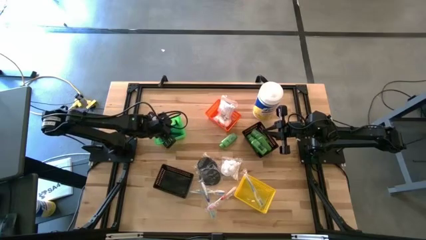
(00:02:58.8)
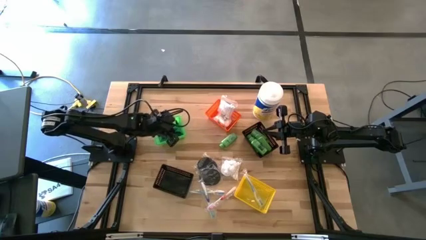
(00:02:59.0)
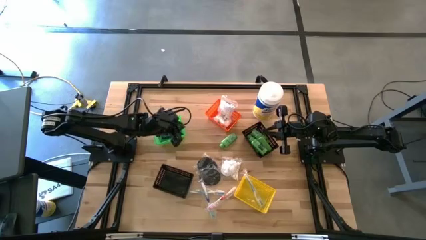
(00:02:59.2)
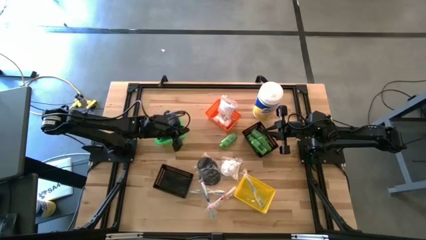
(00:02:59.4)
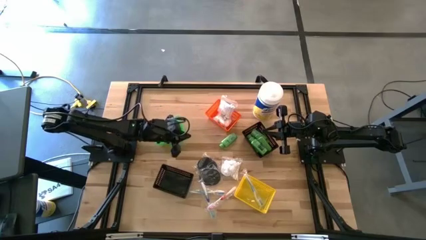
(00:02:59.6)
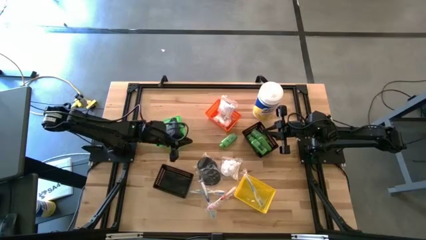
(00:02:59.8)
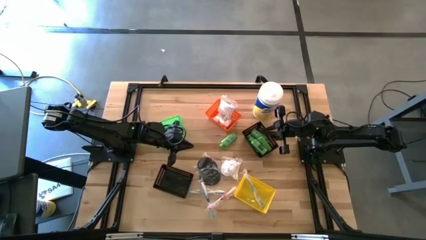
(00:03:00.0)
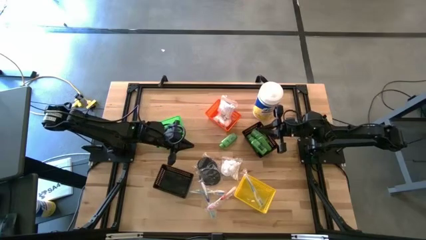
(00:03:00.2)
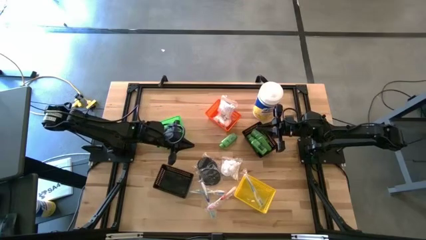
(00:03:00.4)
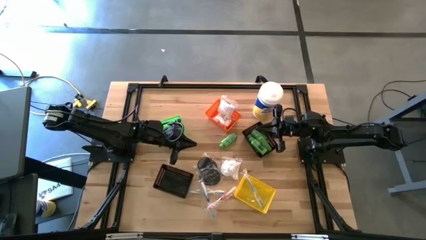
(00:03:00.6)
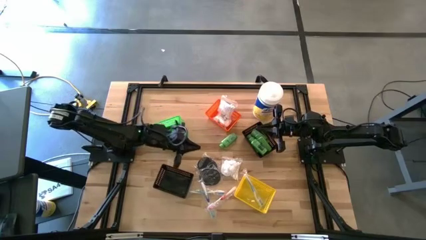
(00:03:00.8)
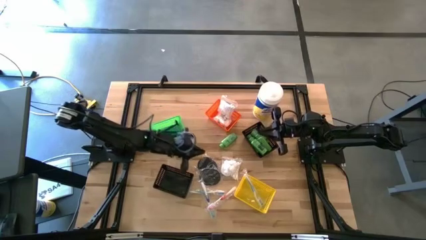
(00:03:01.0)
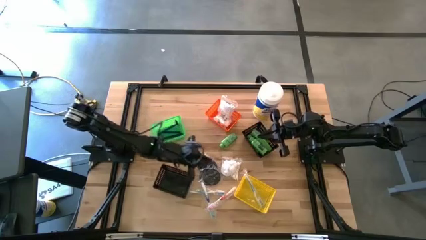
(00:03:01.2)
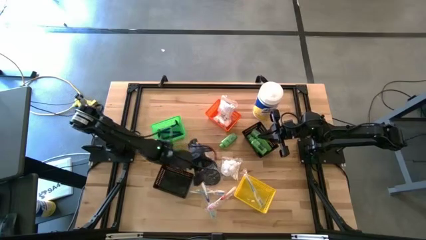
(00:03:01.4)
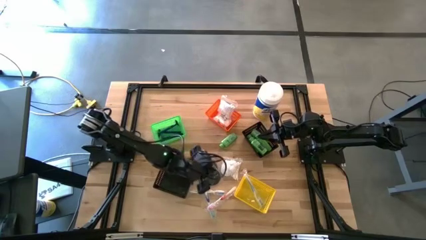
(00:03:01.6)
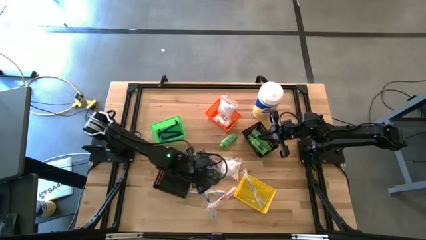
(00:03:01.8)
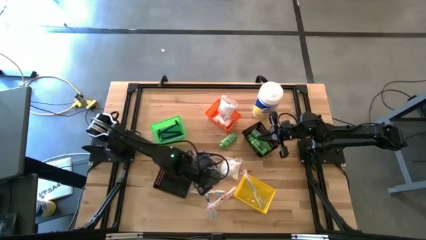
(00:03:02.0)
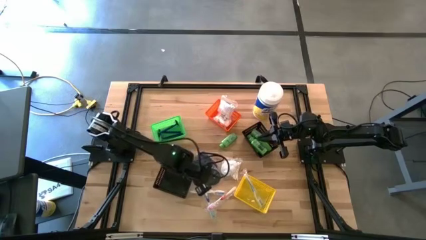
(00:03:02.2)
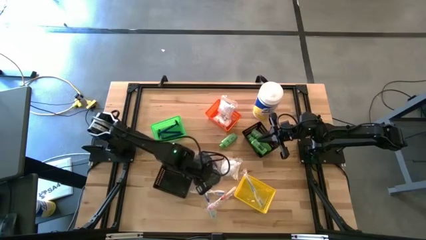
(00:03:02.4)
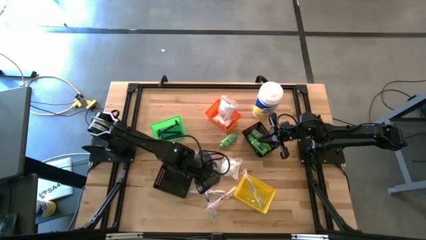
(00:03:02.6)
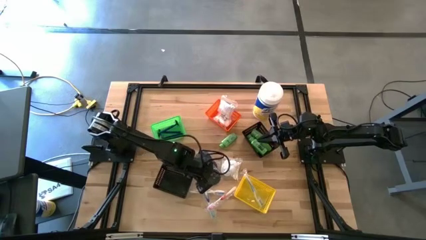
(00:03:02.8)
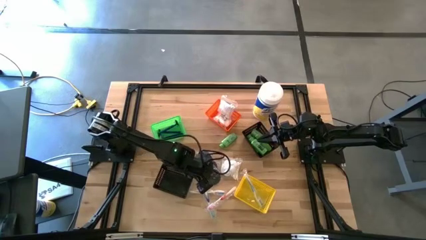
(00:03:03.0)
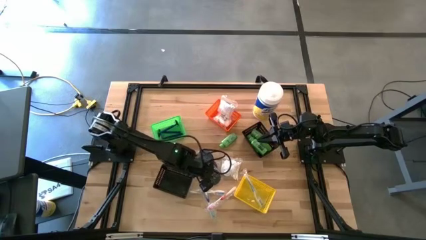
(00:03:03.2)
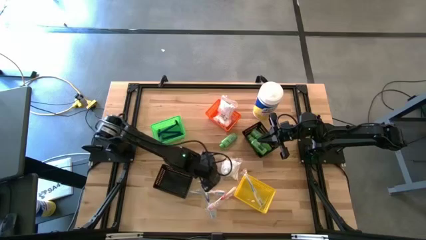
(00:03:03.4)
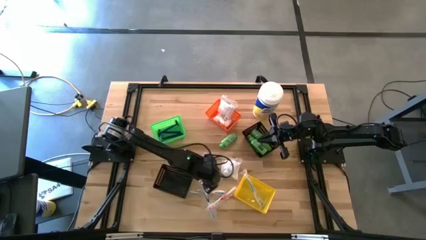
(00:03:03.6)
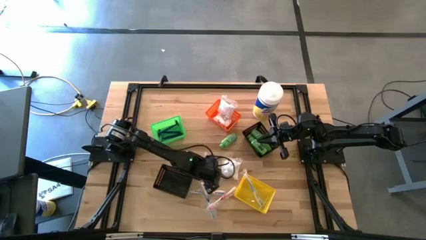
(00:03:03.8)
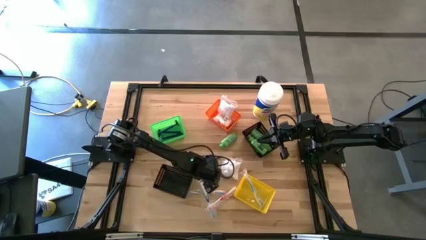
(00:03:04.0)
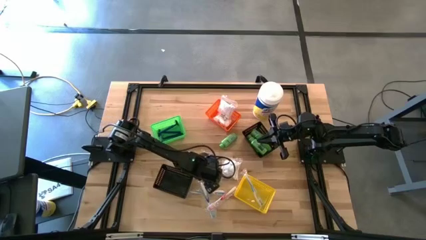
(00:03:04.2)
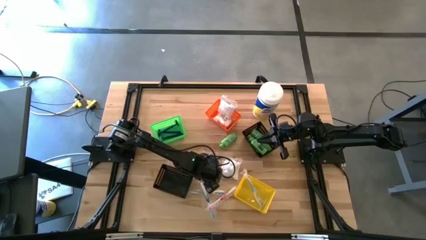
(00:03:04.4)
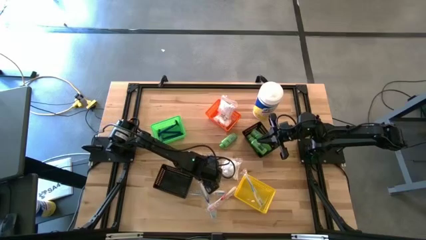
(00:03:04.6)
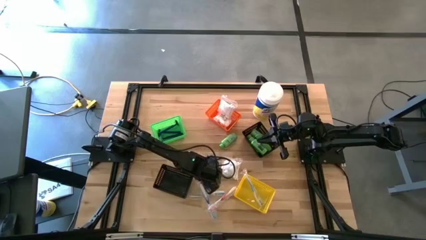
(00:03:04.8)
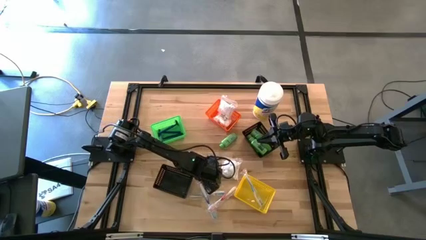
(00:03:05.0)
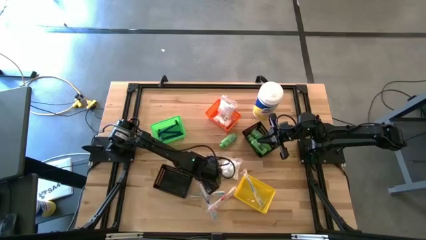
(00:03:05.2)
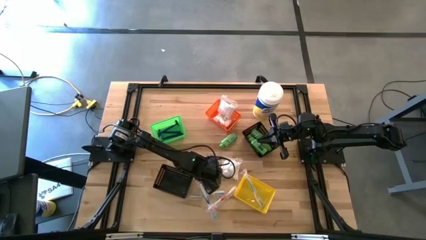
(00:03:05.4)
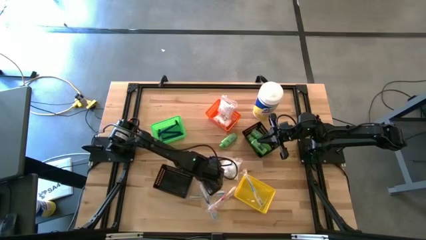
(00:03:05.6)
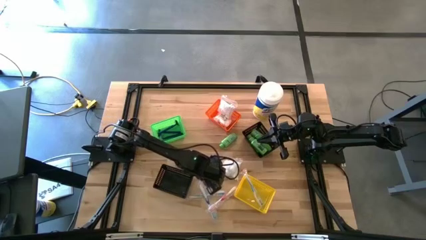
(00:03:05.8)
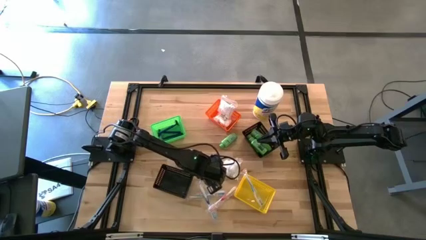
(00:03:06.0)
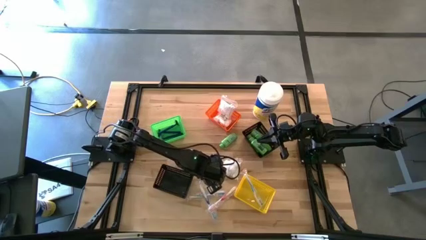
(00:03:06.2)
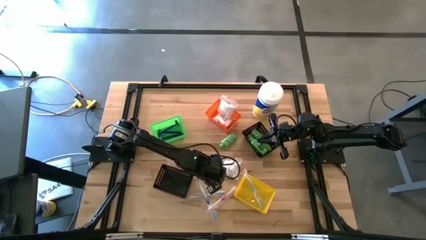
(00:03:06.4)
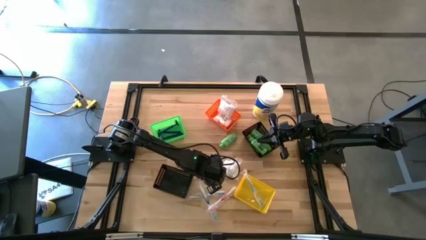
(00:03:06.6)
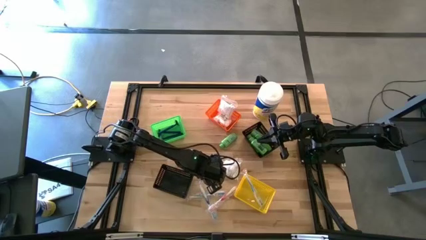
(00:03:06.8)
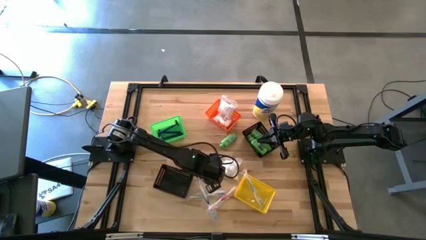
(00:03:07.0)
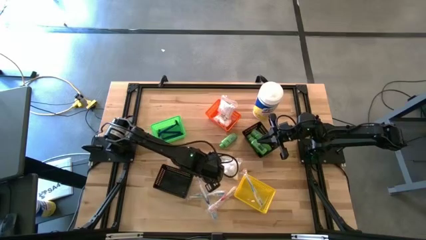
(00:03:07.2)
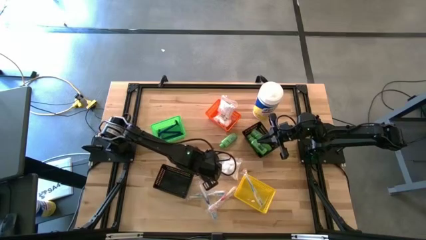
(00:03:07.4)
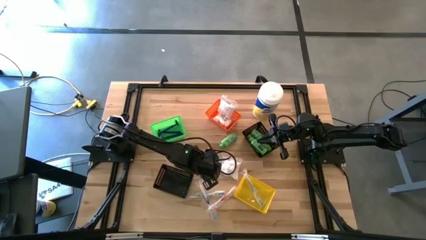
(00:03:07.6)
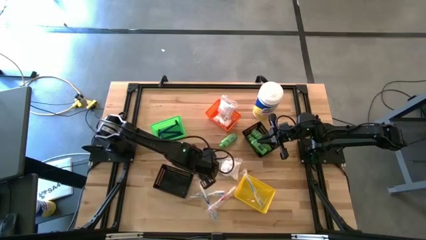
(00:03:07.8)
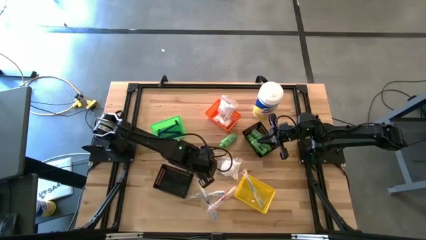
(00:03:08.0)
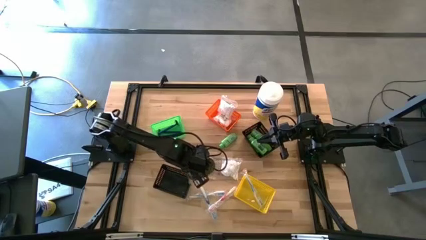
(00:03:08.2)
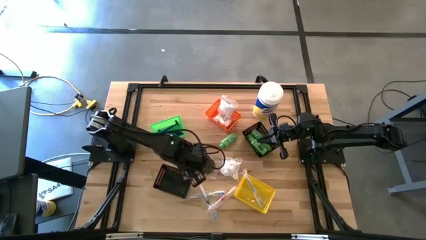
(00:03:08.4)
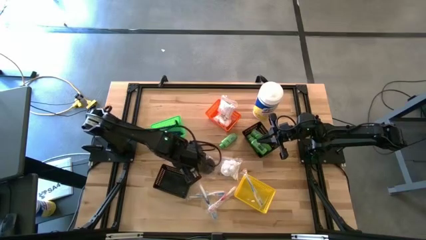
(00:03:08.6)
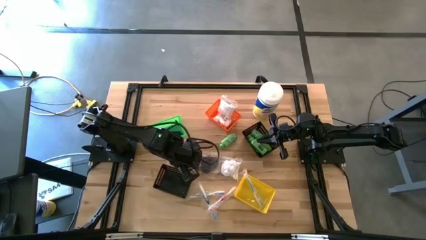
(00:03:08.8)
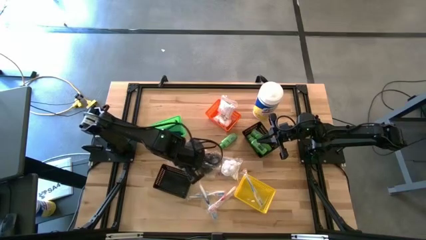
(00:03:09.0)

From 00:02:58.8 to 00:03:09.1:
Task: Pick & Place Travel size toiletries
Put the black hairbrush into the bottom black bin

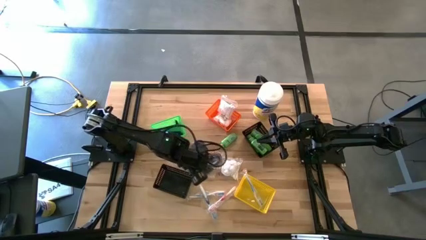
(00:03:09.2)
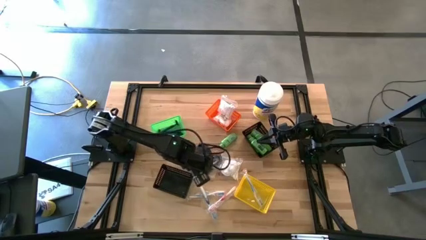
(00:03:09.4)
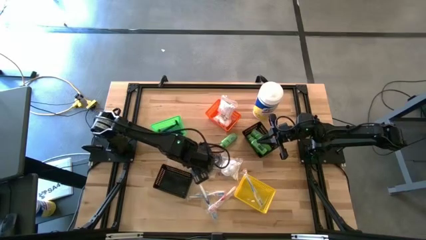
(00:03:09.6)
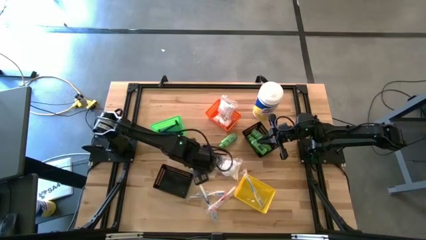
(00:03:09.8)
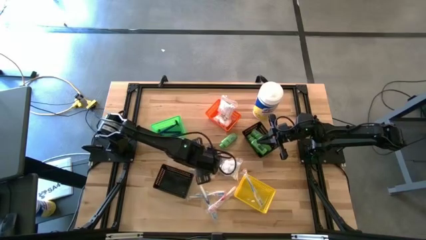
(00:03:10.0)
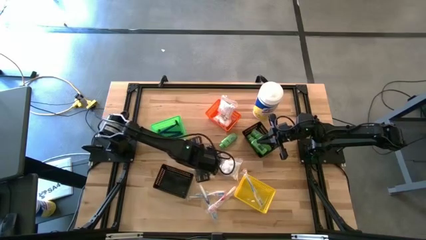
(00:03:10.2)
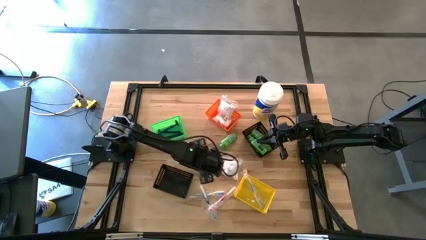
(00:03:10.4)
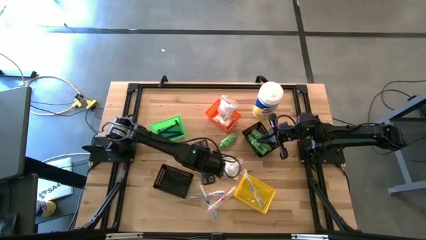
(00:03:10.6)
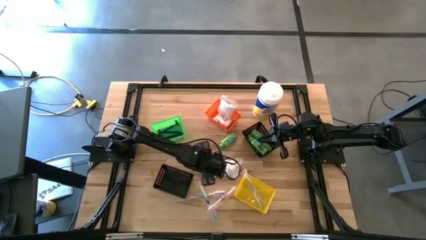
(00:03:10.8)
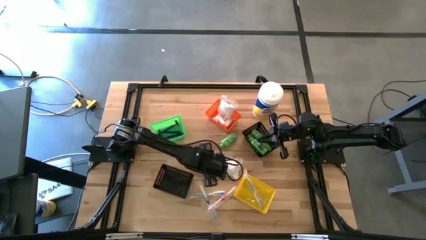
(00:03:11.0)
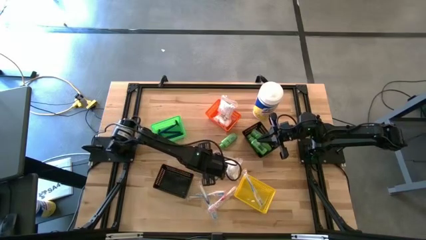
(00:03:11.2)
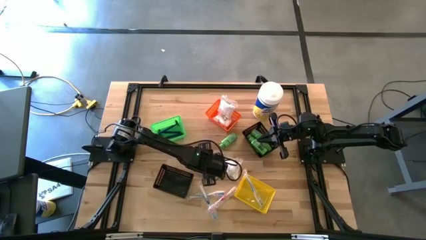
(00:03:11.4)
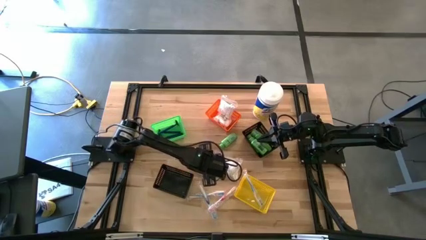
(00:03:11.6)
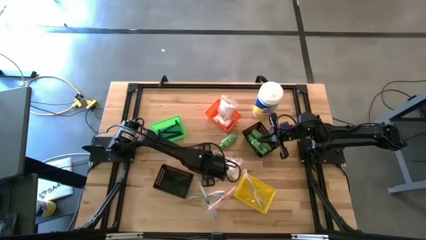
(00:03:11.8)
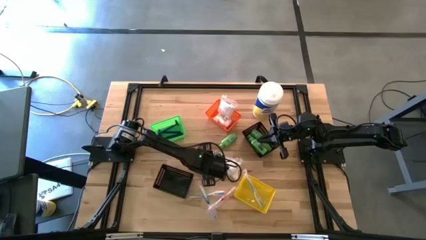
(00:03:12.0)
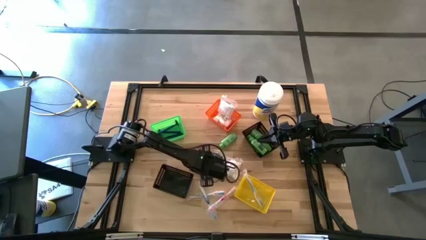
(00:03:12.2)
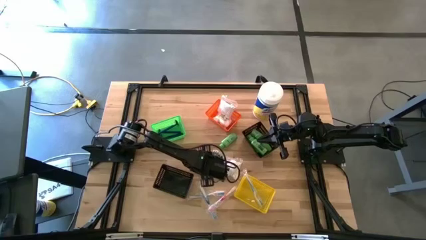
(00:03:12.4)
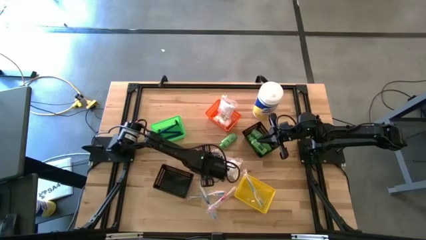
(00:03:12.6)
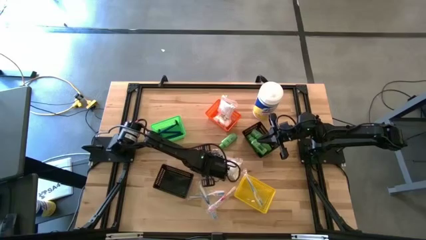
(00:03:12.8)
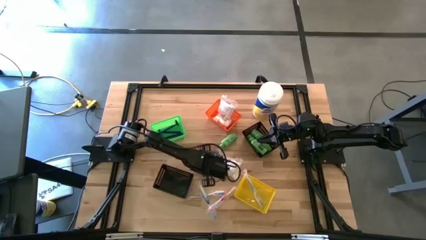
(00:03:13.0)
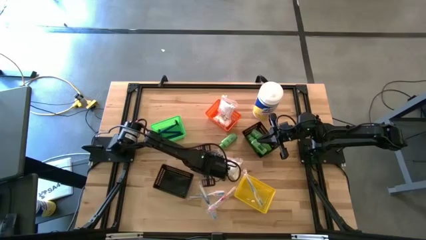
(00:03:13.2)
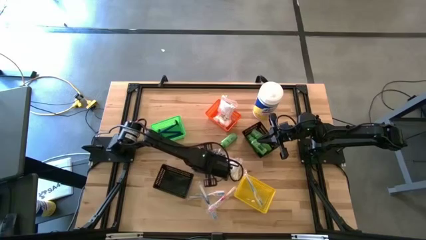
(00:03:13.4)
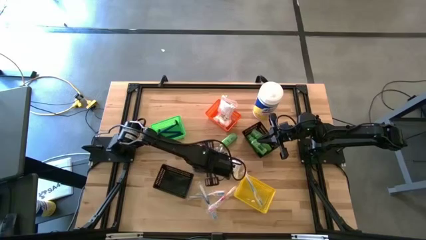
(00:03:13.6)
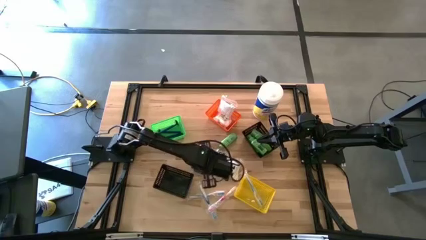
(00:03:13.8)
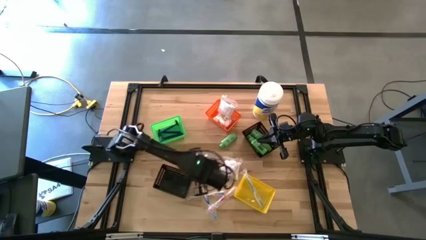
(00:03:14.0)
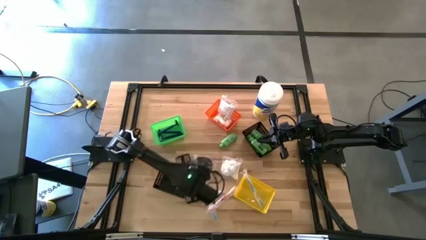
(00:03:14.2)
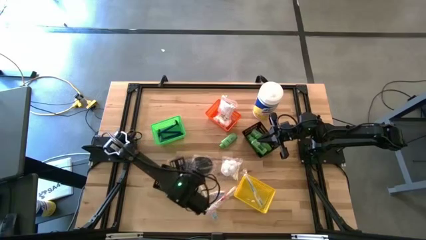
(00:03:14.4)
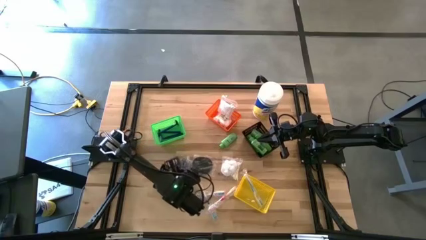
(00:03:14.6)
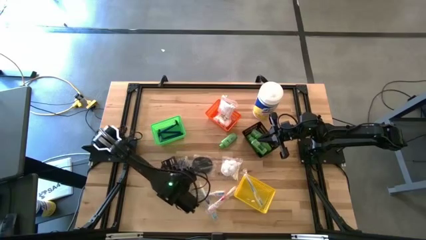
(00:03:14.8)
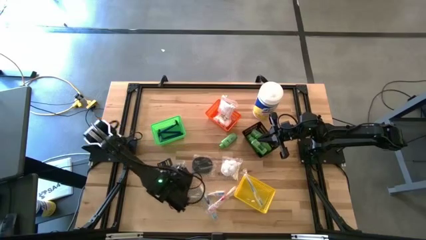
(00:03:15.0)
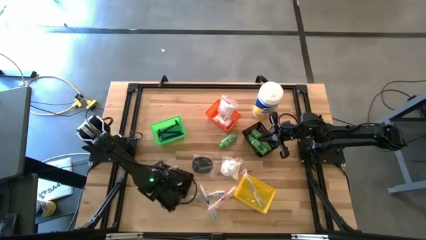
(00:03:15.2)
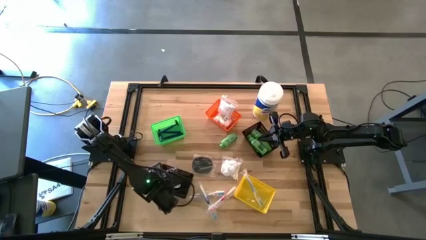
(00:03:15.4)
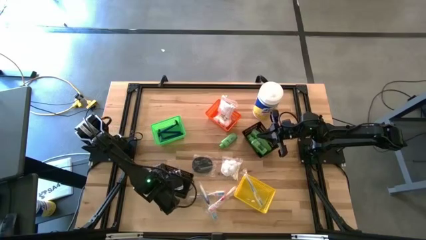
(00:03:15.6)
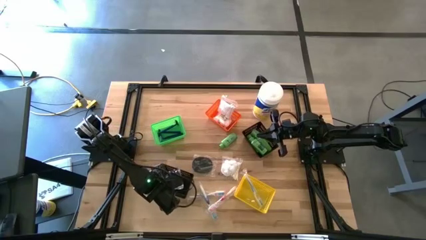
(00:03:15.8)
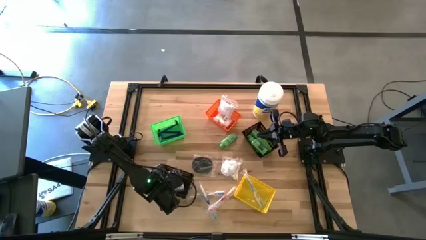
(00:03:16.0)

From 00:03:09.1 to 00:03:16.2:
Put the black hairbrush into the bottom black bin
